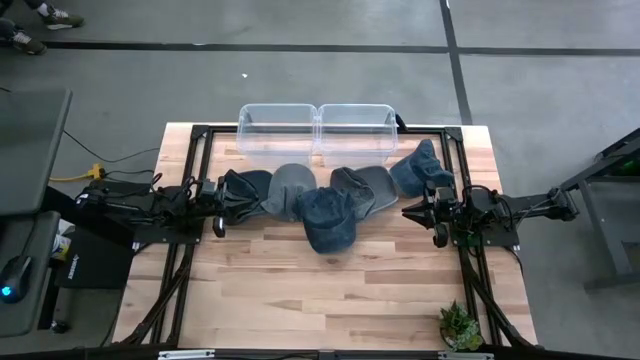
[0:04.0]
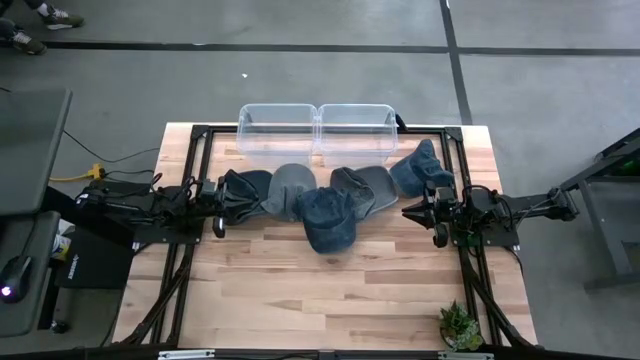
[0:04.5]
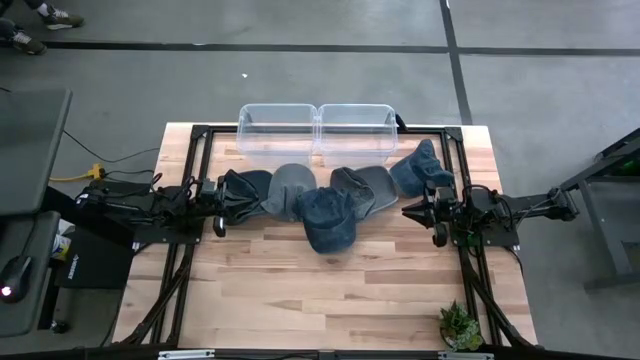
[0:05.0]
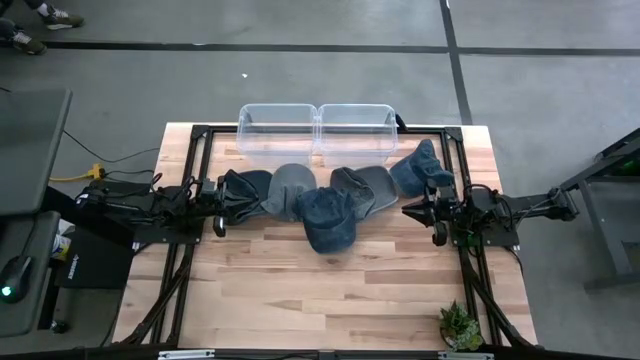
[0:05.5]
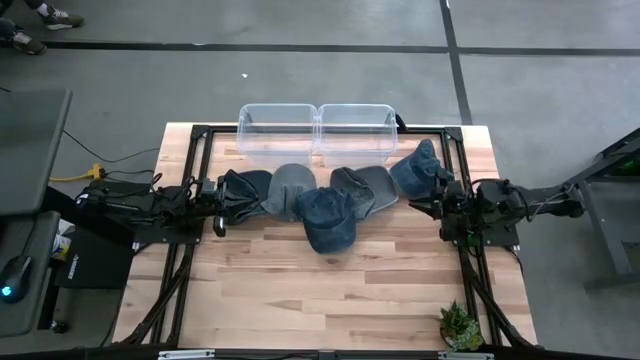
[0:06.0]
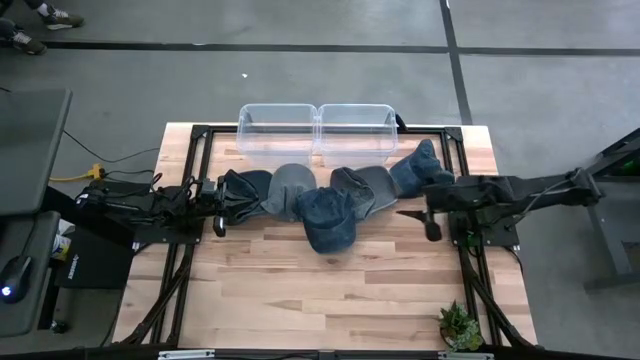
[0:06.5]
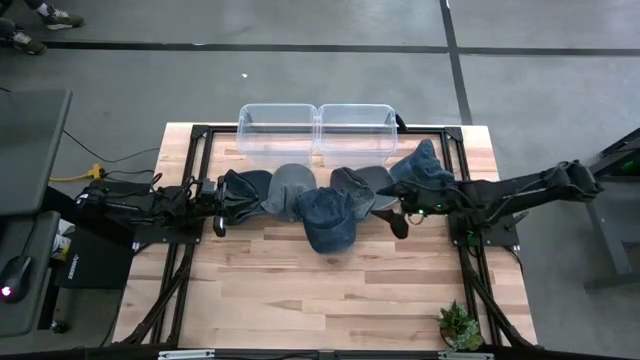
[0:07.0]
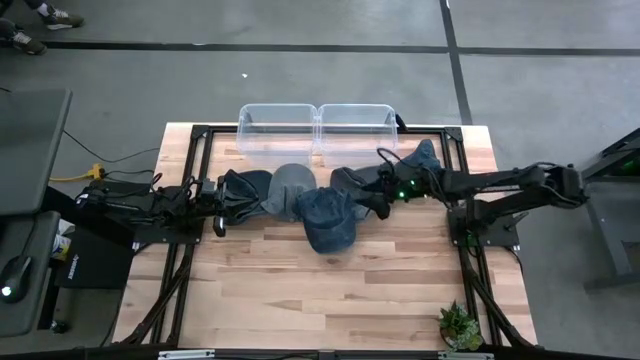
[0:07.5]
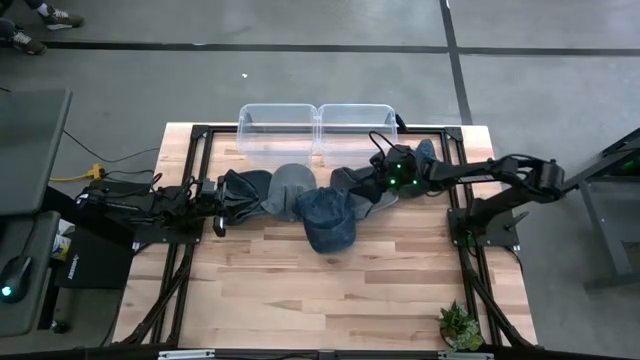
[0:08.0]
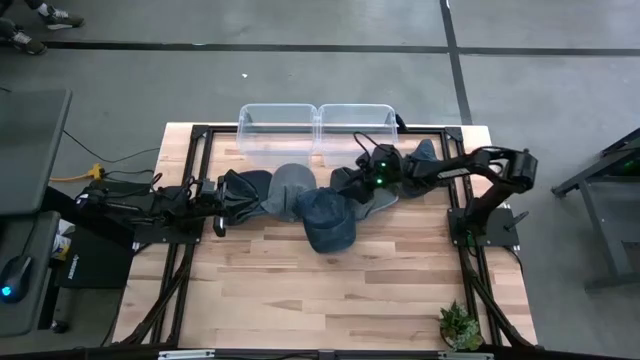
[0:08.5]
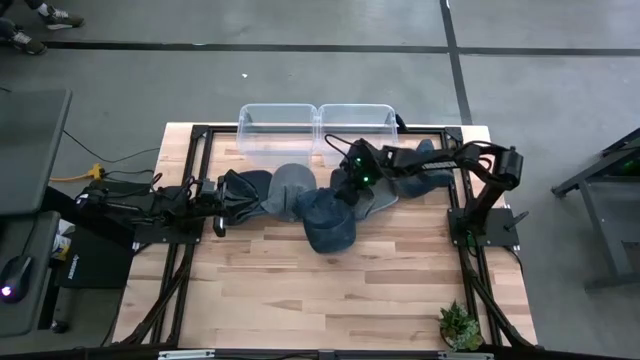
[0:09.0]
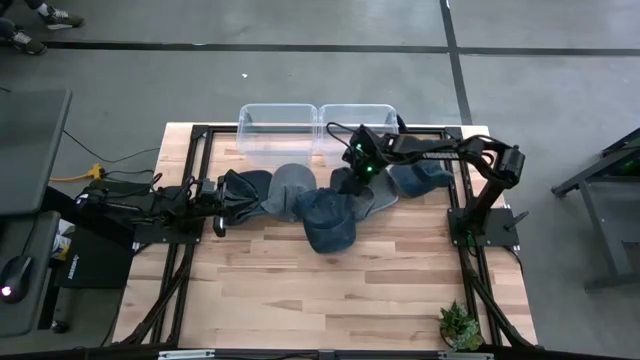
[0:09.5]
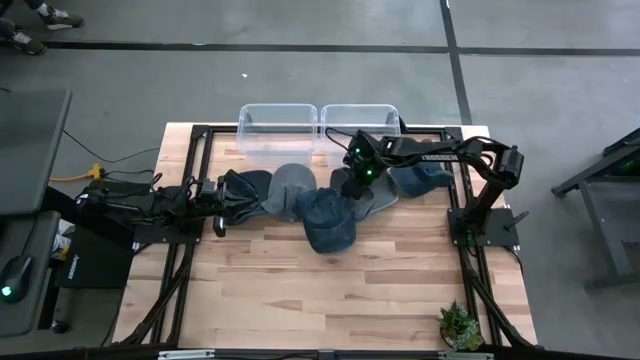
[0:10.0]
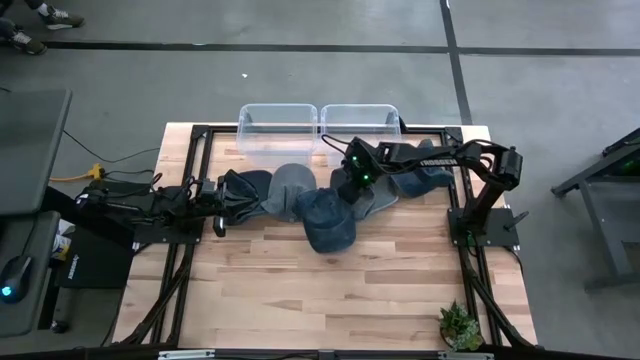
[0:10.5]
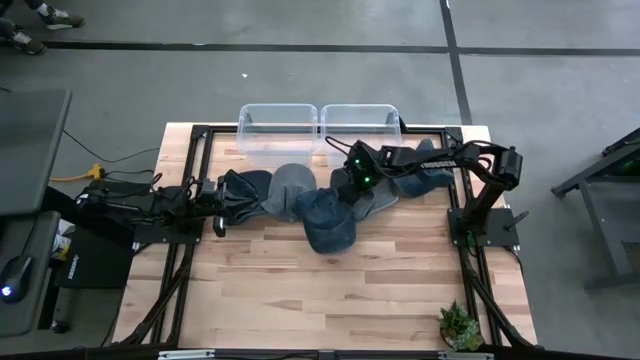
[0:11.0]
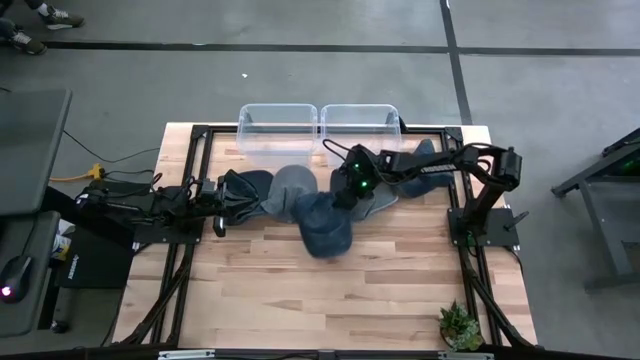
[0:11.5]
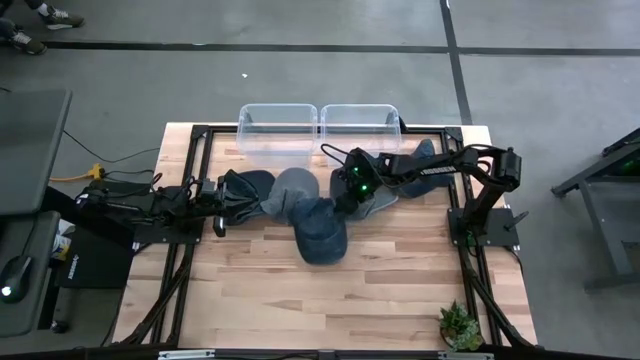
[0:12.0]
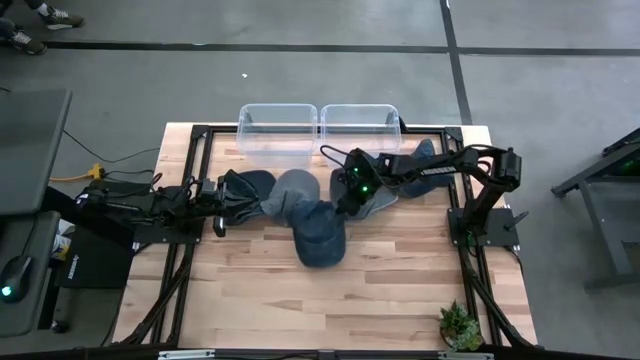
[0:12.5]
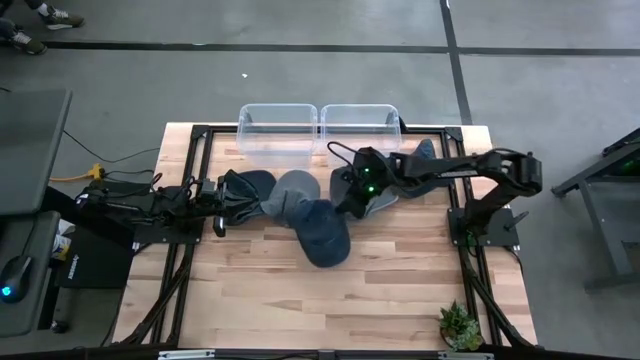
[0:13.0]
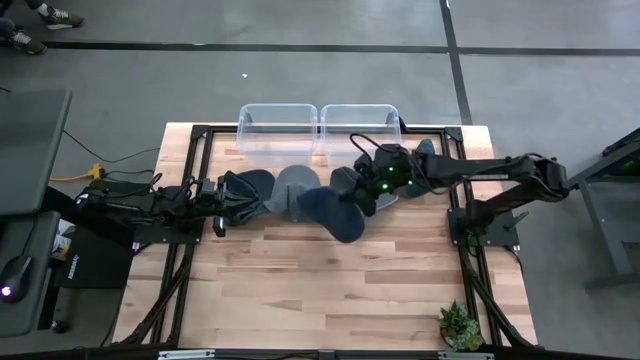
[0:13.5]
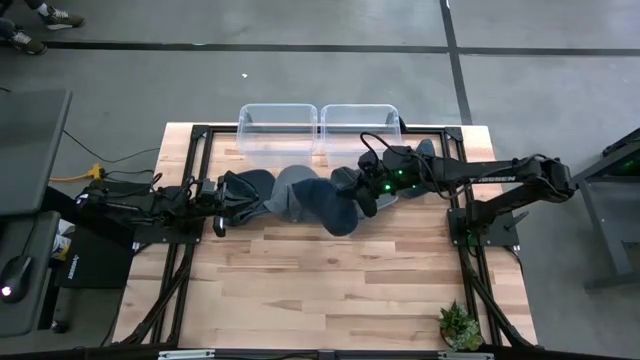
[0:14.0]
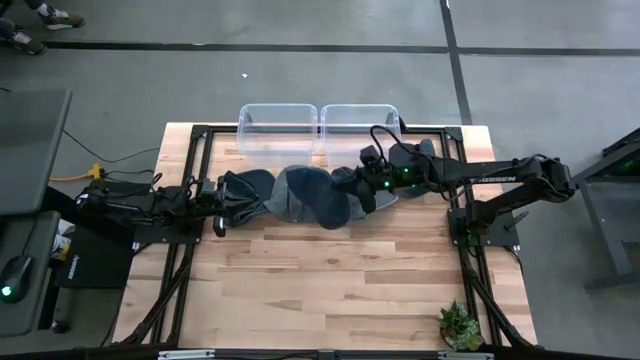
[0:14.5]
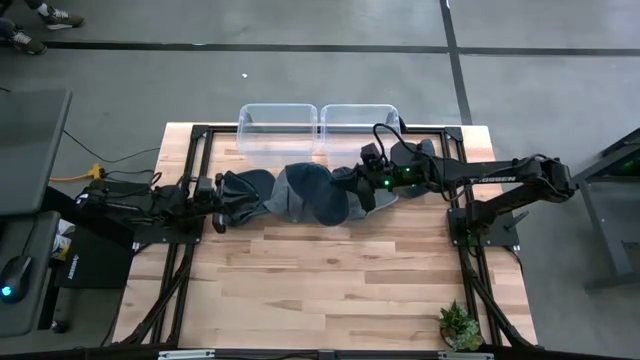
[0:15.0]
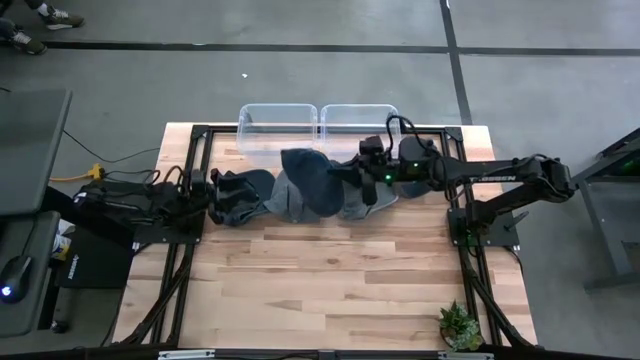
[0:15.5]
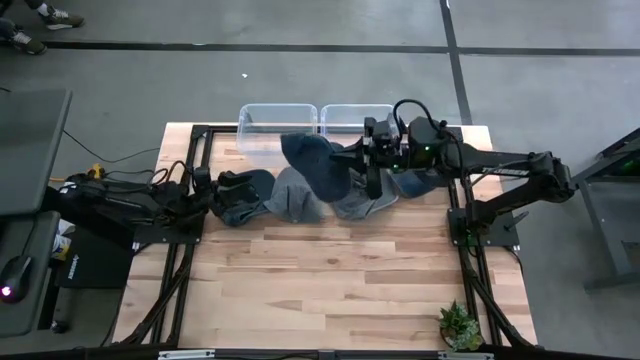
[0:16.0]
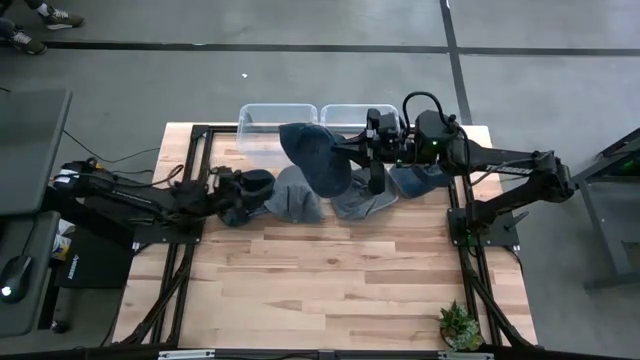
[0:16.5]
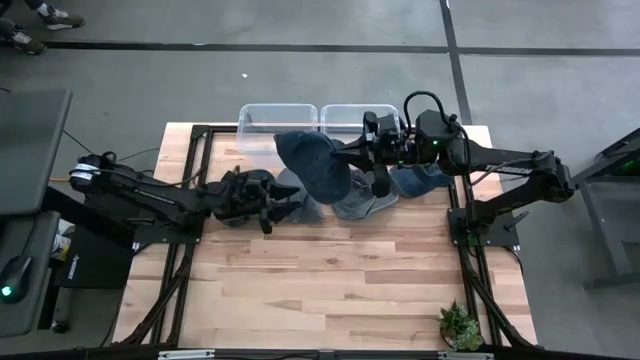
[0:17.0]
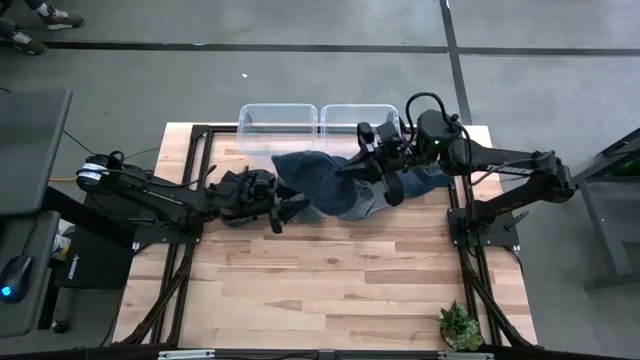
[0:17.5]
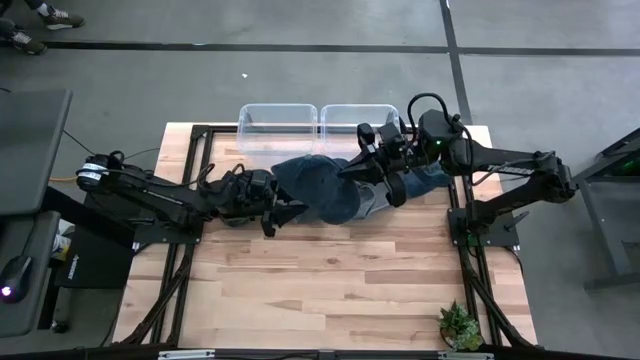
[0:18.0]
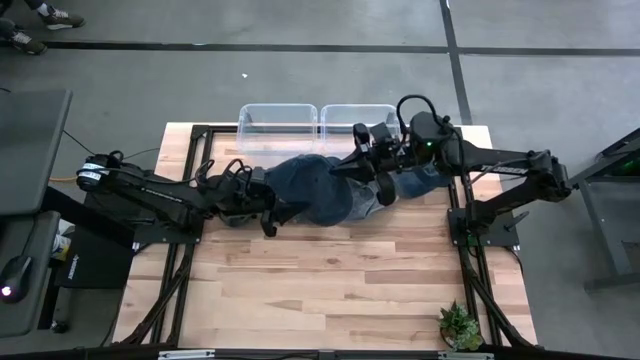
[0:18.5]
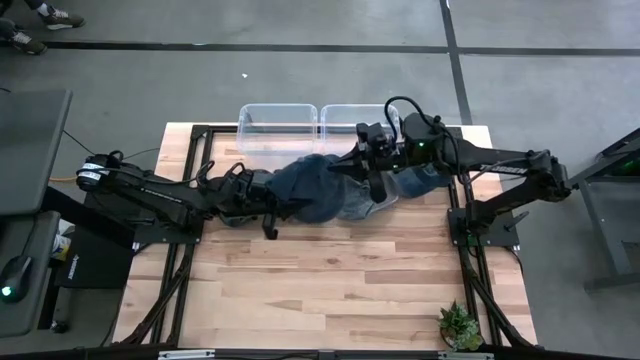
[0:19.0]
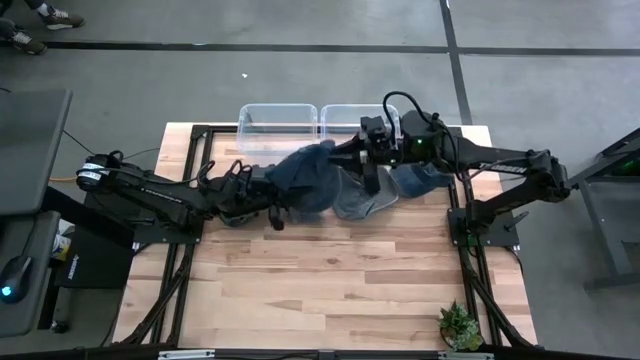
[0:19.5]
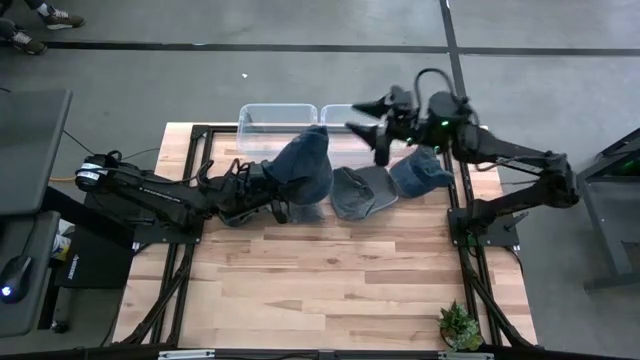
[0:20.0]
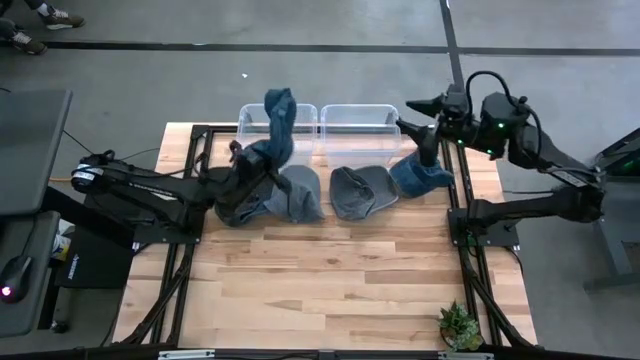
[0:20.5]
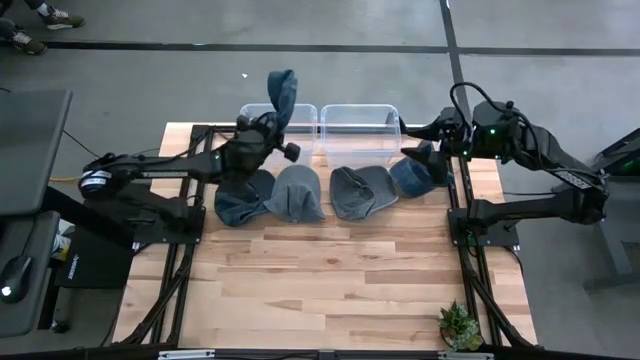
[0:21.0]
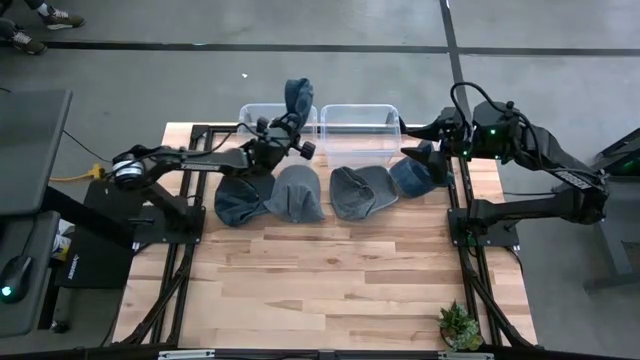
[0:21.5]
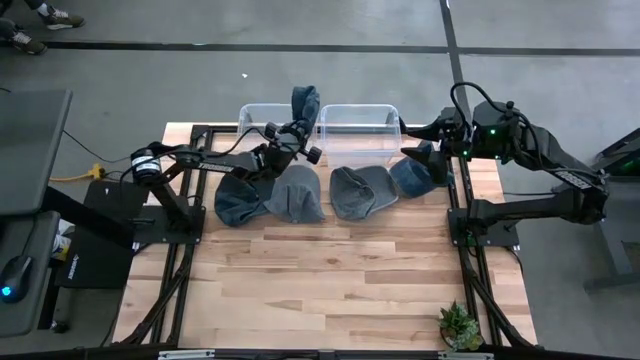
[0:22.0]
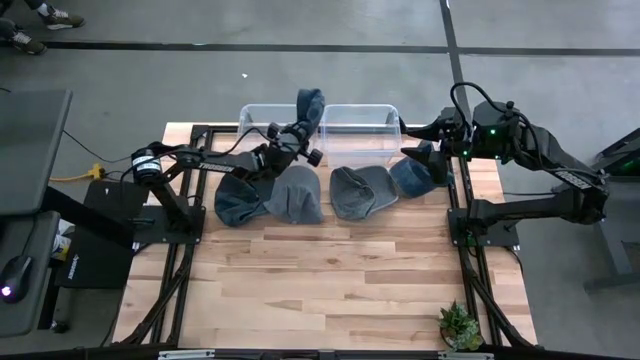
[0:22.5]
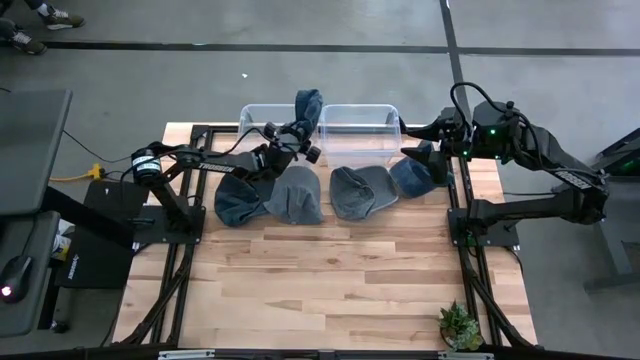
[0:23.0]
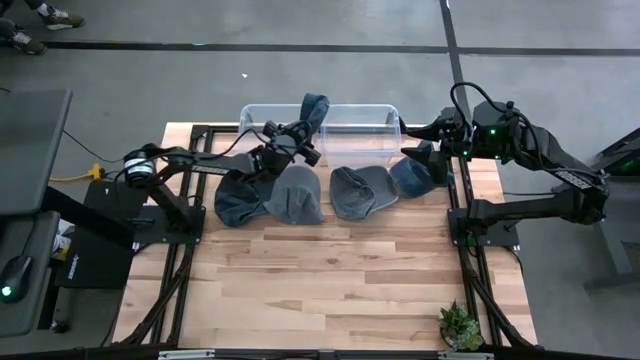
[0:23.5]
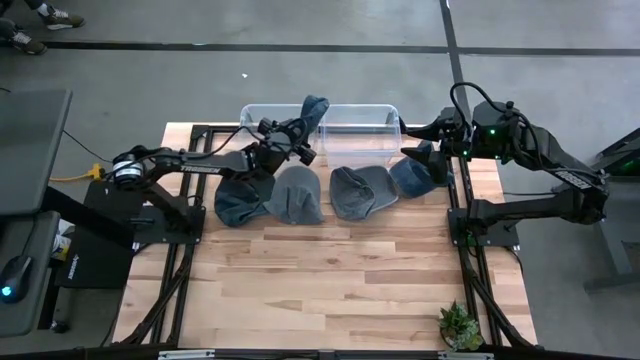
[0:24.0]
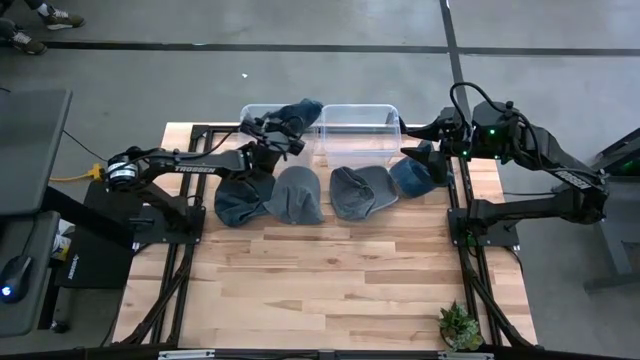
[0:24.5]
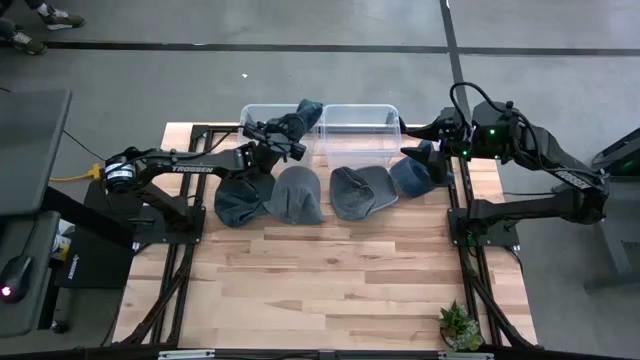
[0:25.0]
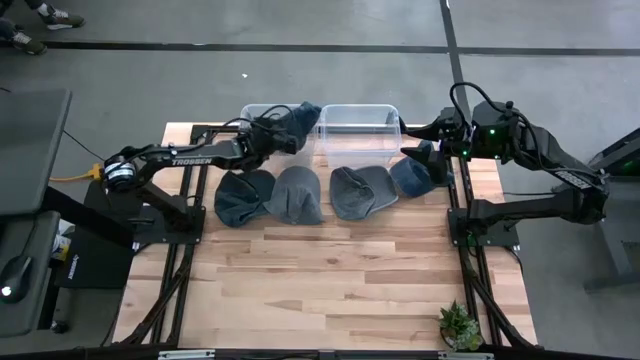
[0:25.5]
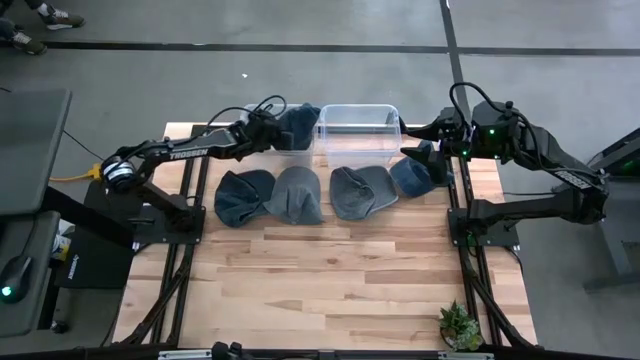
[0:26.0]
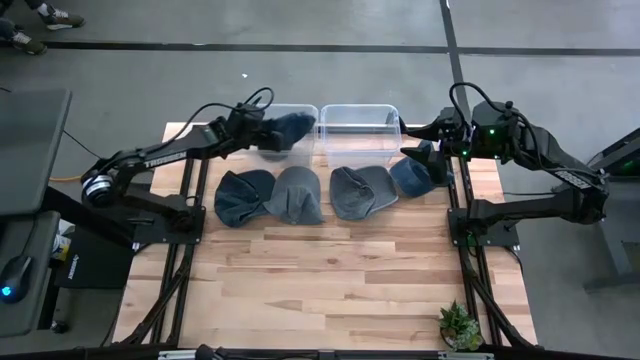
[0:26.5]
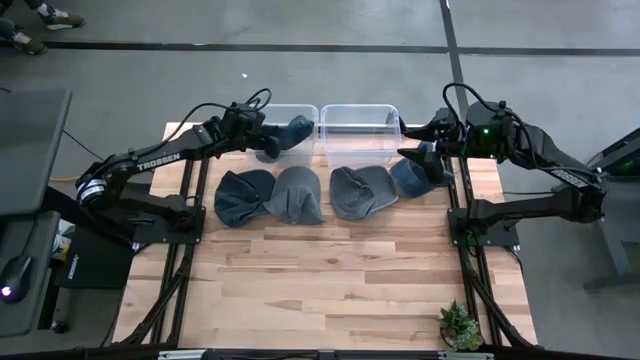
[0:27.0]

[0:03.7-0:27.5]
Task: Pick and place caps into container
Put the middle blue cap into the left transparent container
